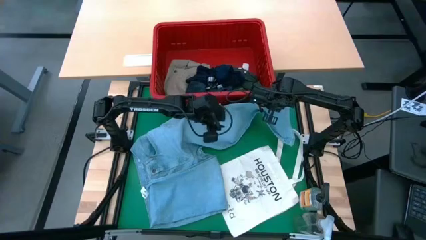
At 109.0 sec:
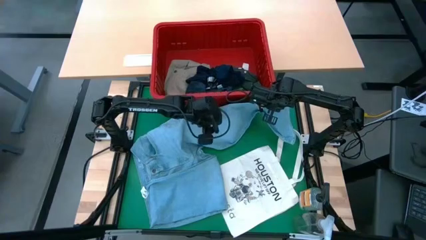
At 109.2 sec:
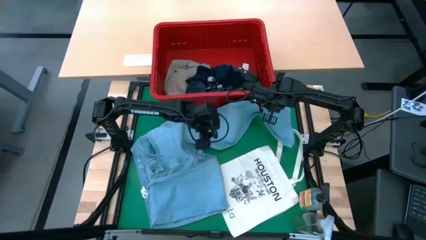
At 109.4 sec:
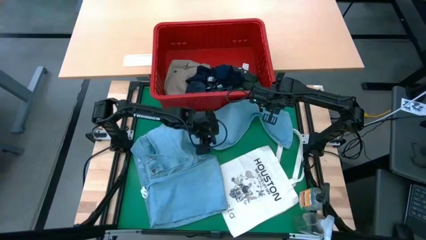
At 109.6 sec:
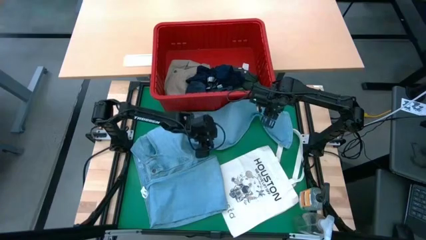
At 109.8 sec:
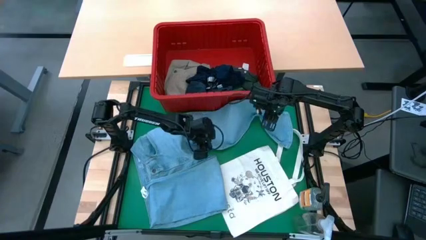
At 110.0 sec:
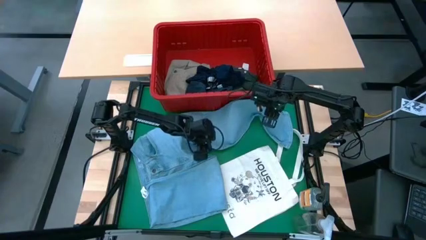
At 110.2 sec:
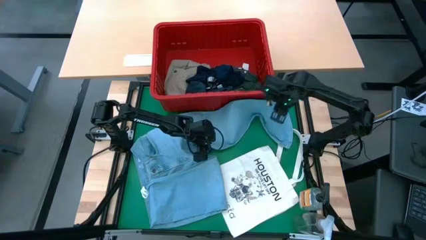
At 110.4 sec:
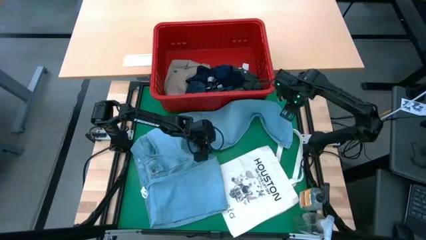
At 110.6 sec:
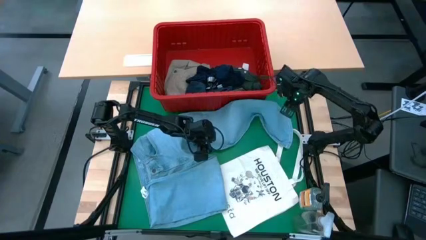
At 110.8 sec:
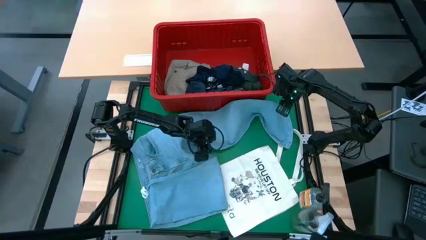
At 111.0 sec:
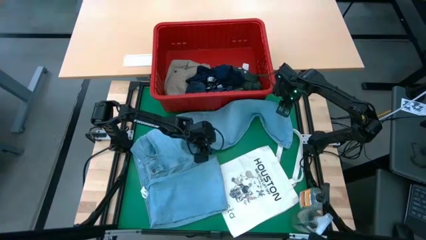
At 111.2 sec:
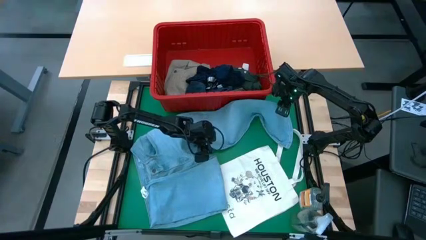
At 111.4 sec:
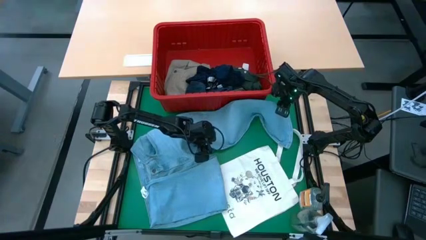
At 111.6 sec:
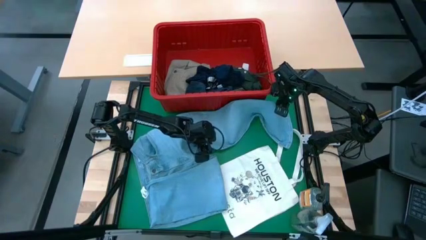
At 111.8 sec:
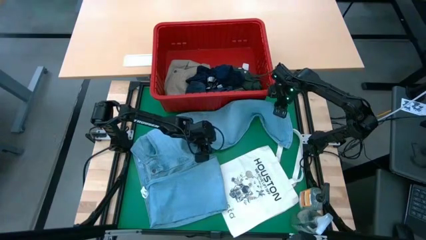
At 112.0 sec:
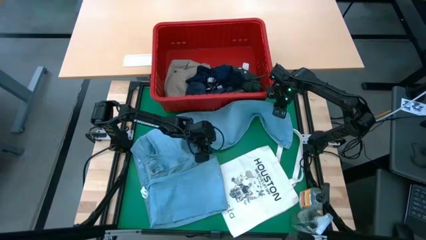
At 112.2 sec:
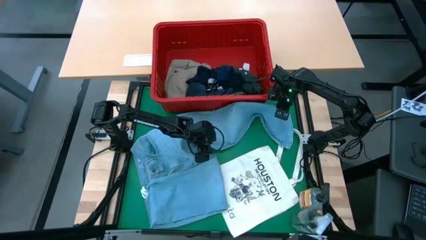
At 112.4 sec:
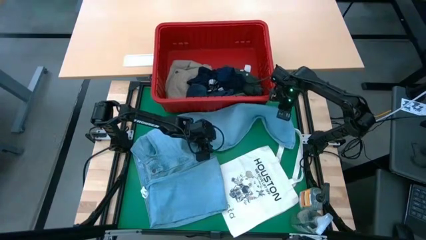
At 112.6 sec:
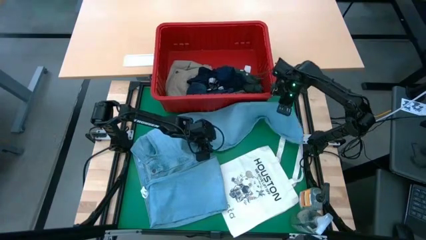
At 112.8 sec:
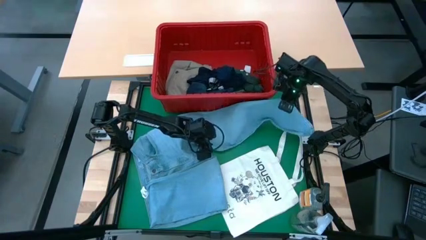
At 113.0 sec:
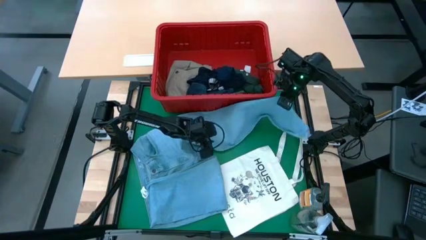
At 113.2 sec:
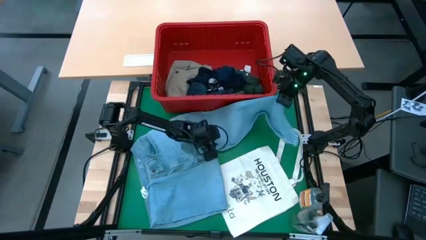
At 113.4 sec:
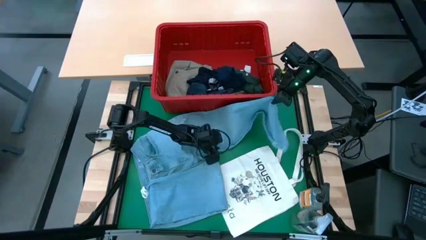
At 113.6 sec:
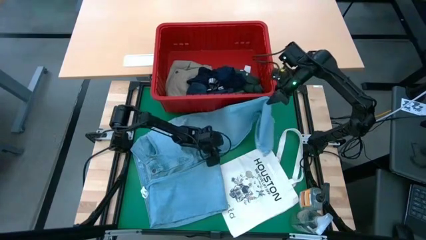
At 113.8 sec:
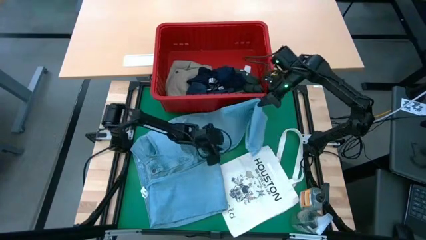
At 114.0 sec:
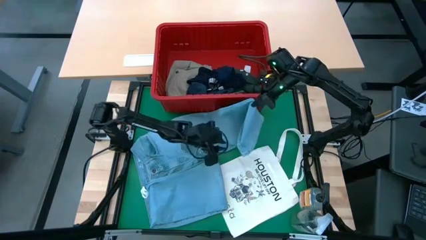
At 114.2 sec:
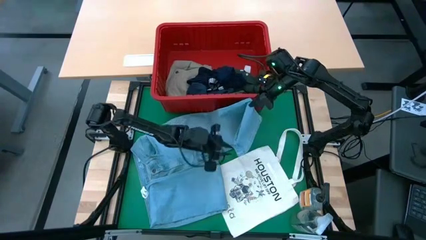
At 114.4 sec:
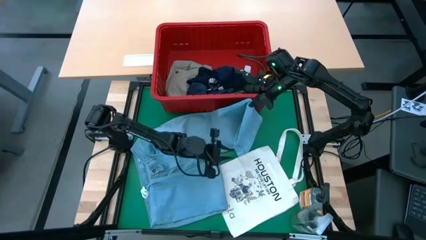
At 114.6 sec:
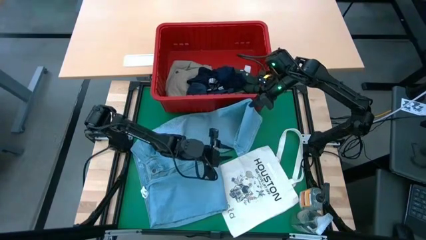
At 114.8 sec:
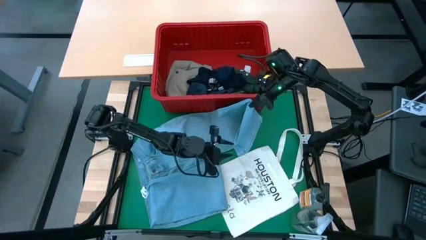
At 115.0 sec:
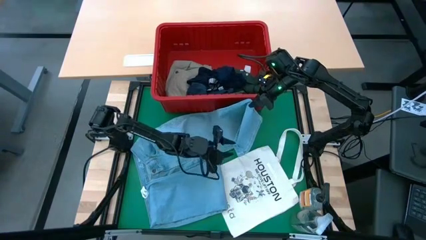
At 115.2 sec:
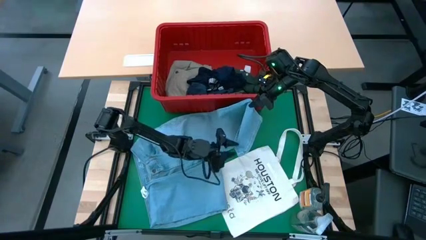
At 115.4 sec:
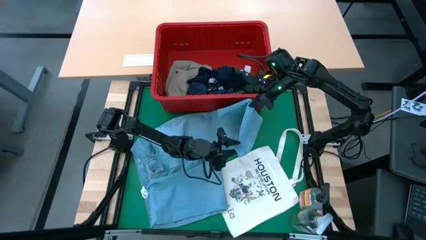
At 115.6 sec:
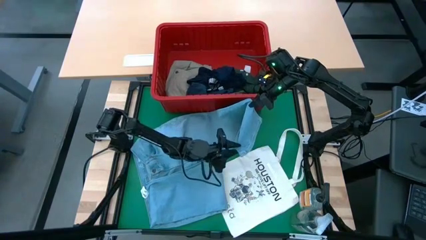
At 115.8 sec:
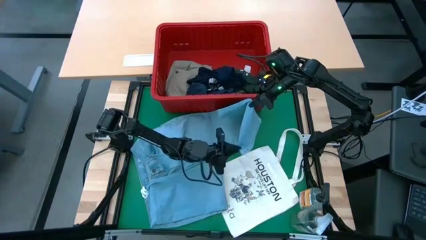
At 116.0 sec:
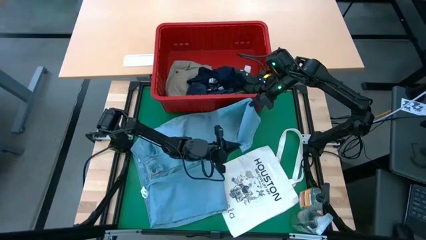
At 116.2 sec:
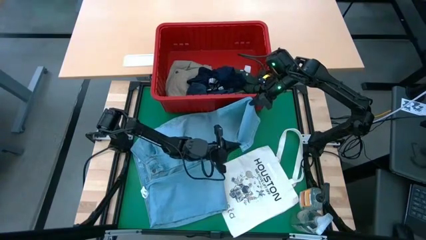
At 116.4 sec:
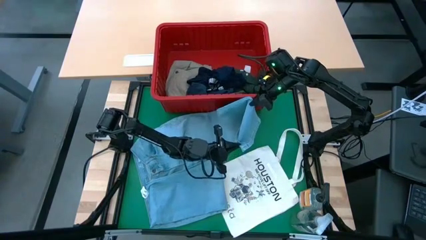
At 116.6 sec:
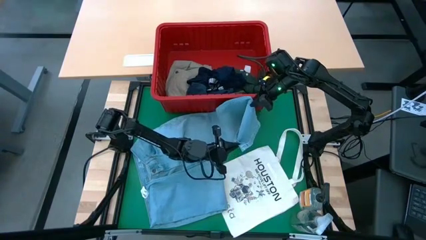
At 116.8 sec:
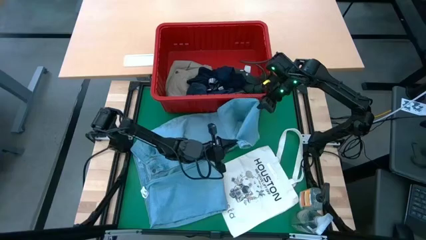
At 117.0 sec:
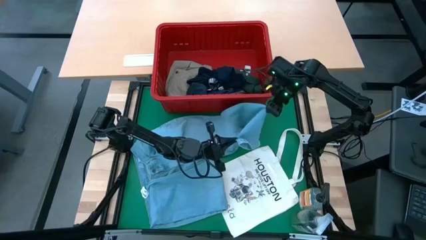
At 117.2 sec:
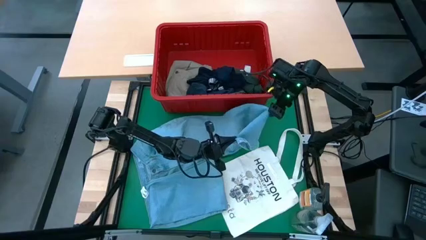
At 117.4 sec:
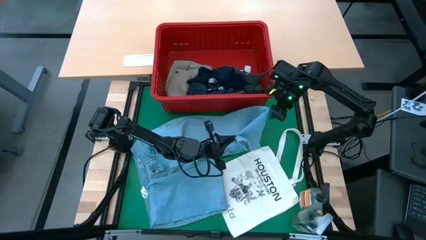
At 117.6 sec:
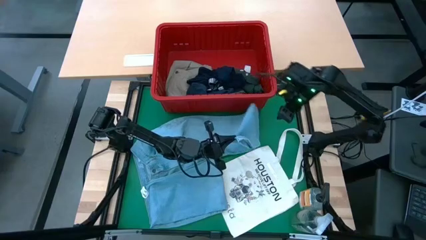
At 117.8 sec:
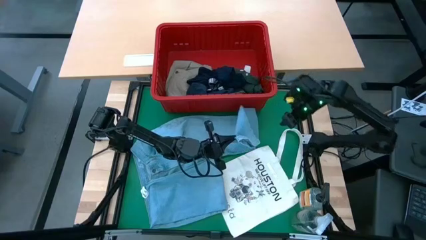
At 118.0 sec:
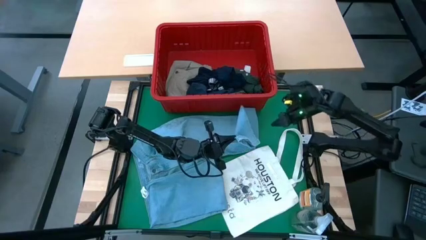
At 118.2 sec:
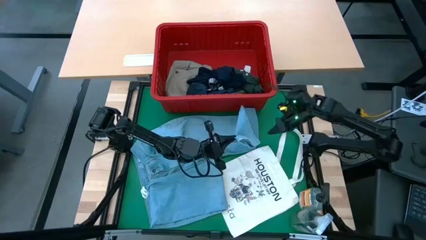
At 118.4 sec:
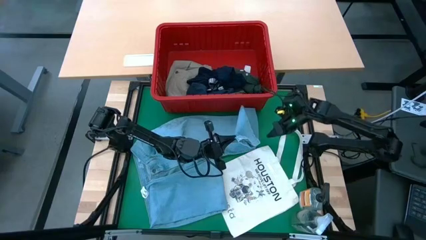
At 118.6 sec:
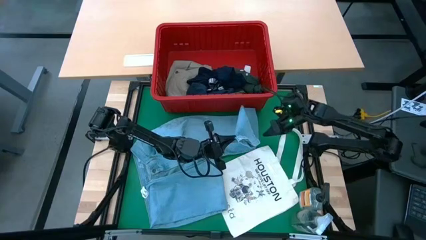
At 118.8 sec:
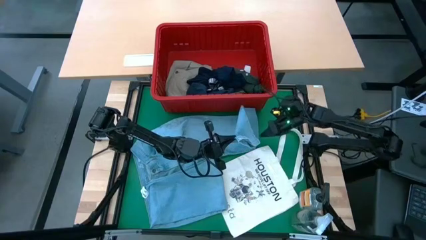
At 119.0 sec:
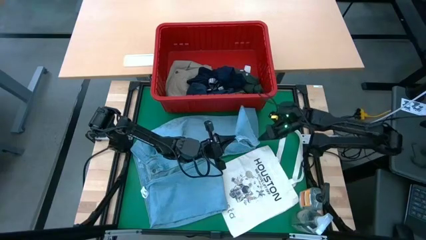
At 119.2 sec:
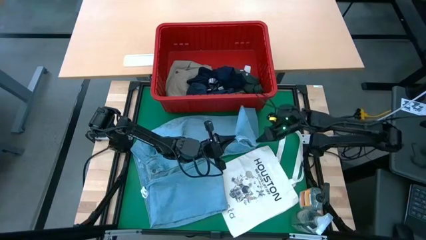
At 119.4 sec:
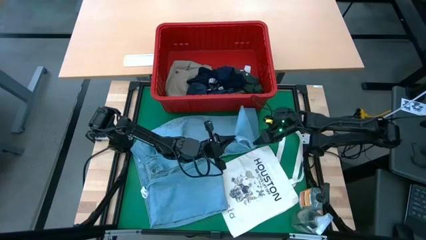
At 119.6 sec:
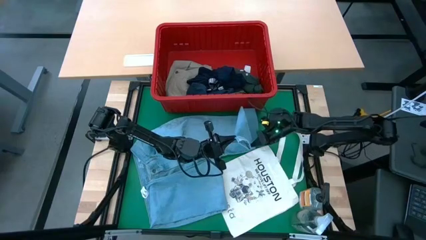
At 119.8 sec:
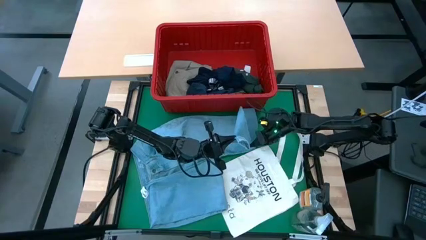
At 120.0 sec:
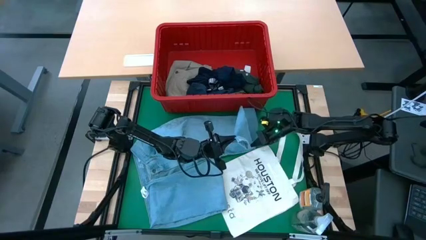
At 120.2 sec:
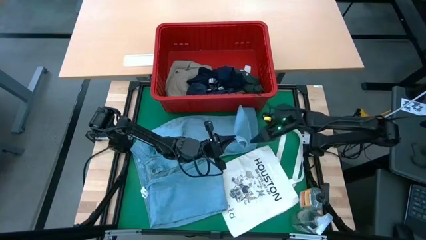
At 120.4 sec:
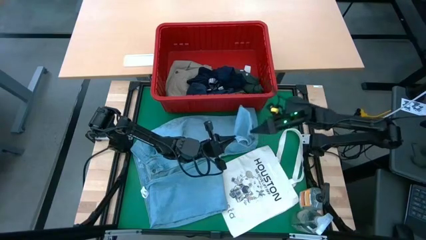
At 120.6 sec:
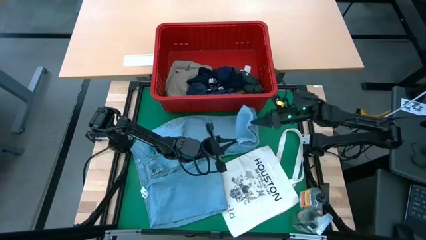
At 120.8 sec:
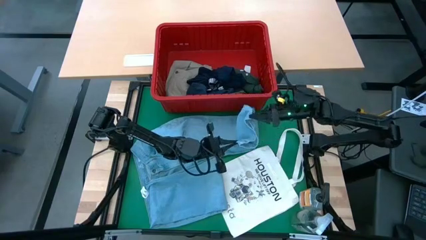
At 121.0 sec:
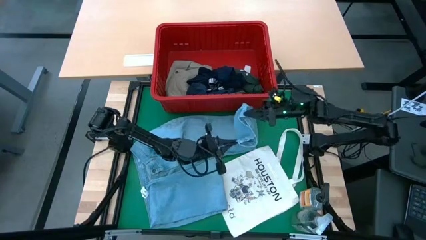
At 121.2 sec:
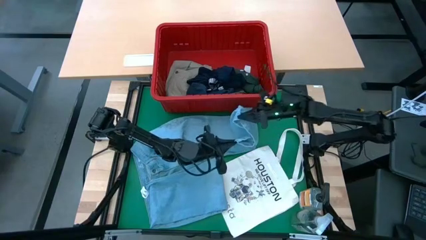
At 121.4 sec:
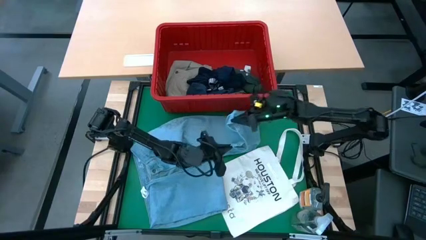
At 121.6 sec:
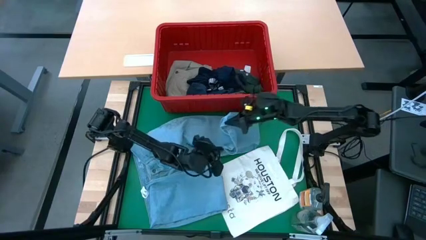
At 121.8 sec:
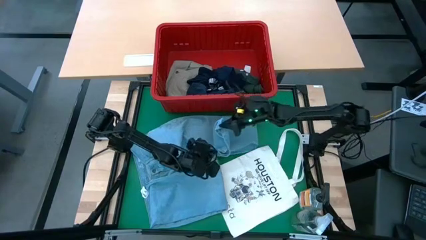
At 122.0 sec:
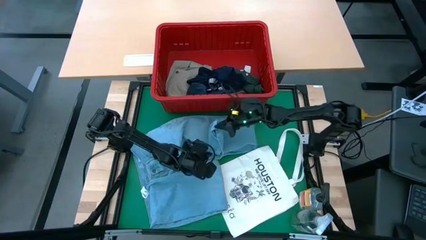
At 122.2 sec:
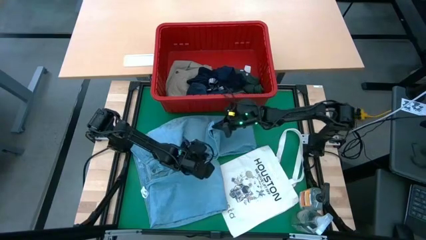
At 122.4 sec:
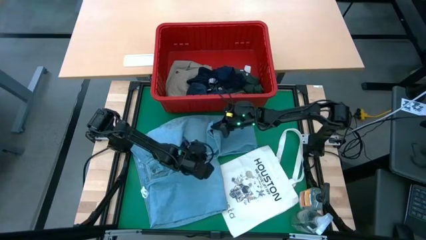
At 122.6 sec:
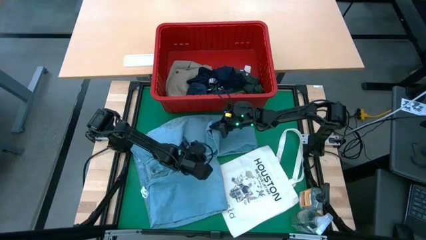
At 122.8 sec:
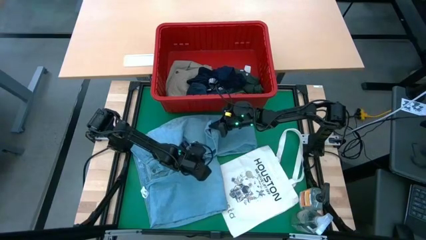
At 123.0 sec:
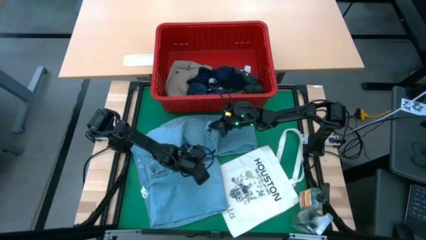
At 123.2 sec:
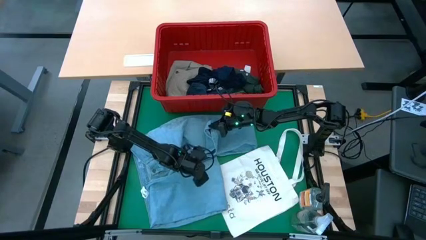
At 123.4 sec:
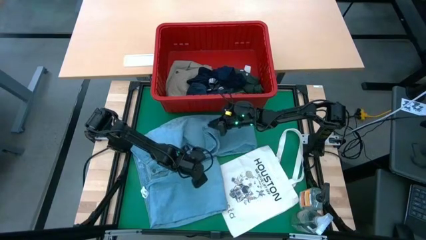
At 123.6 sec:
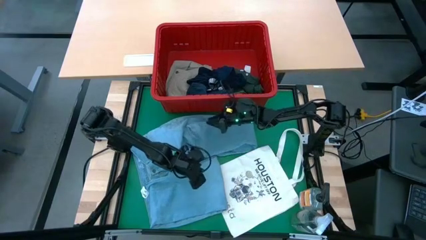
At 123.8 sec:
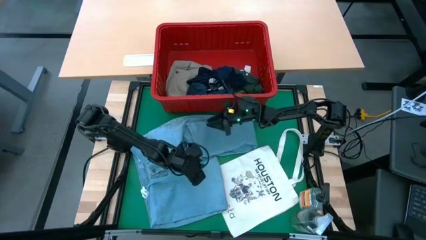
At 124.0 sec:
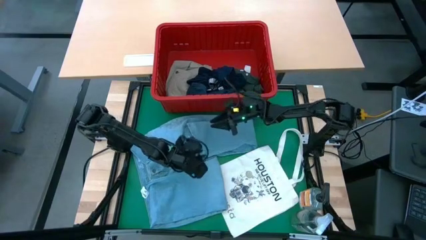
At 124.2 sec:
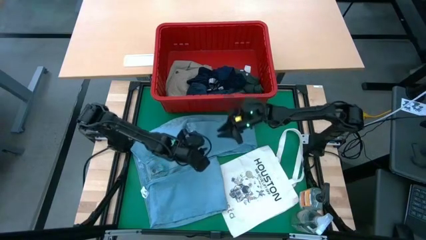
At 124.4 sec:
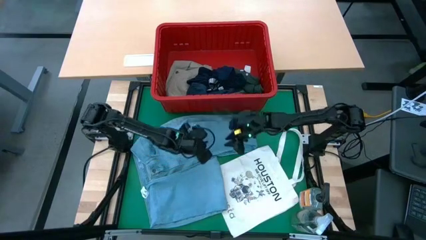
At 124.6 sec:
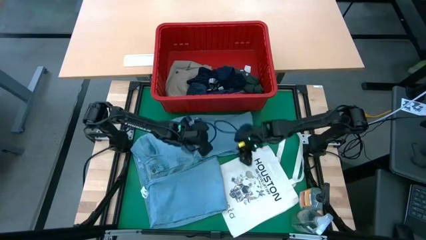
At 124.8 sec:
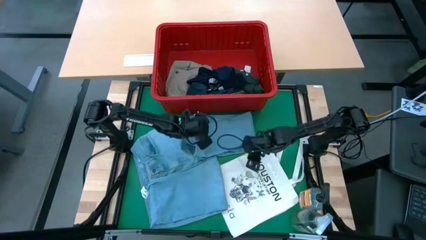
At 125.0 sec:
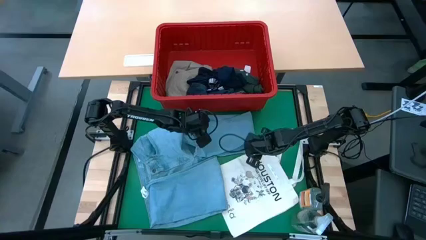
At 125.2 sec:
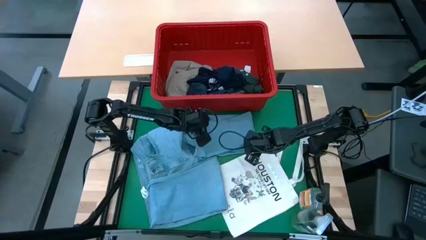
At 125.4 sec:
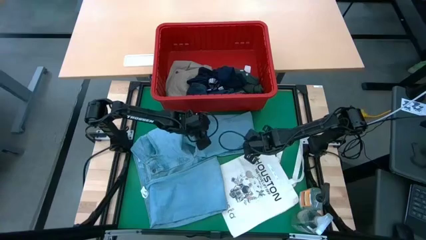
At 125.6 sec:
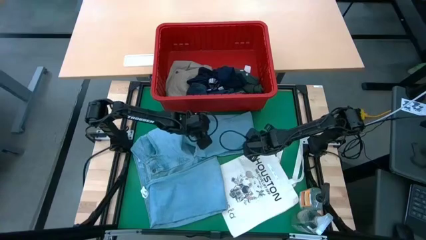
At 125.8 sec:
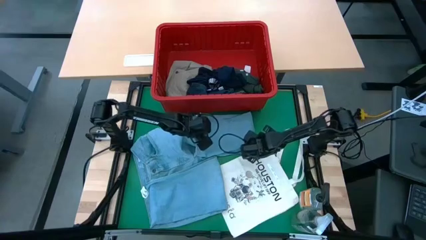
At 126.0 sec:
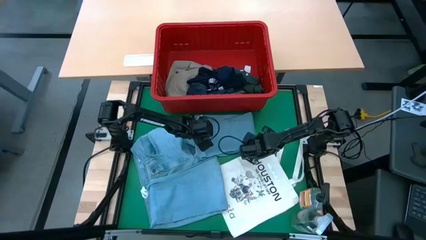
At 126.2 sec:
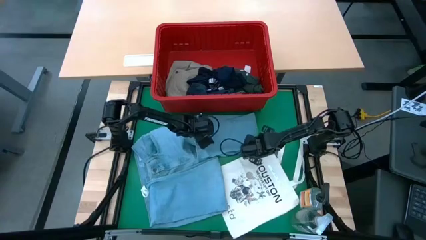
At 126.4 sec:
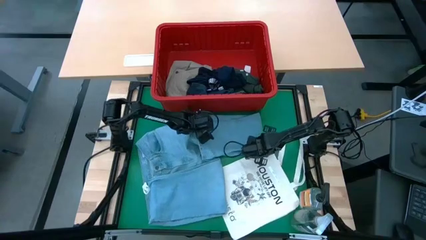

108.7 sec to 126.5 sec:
Task: Fold Laundry from Bin
Fold the blue jeans
